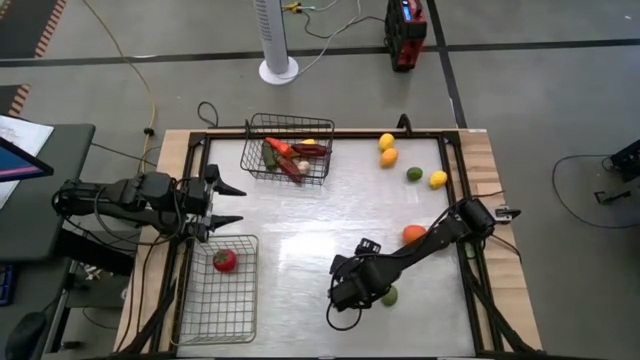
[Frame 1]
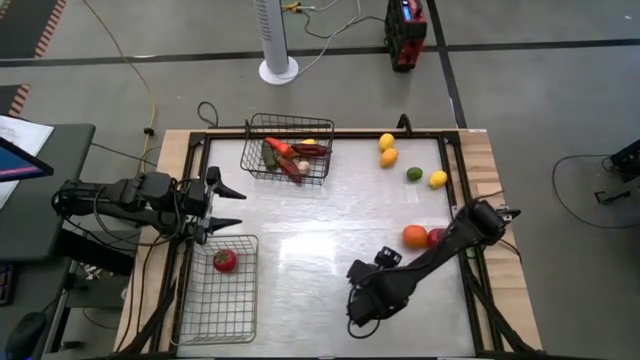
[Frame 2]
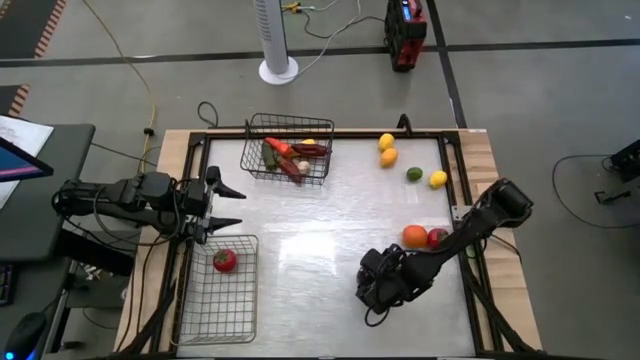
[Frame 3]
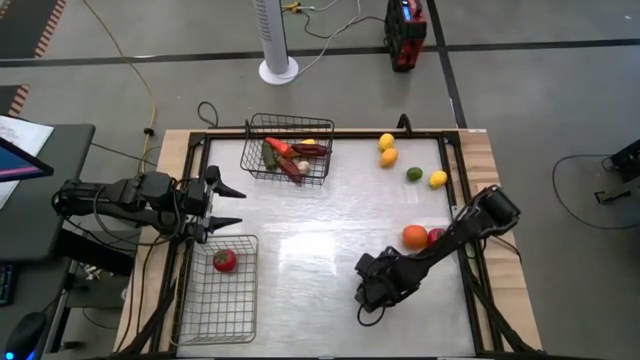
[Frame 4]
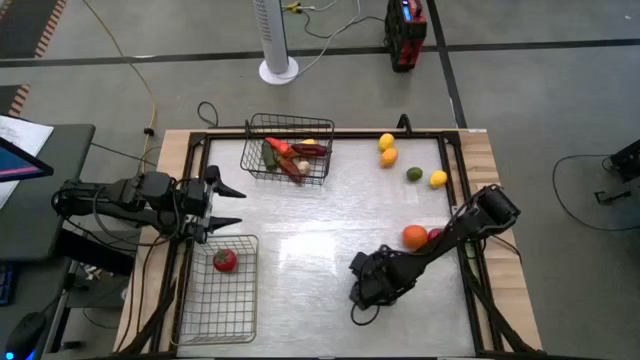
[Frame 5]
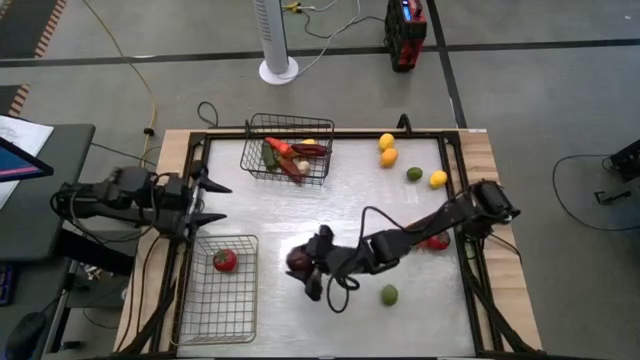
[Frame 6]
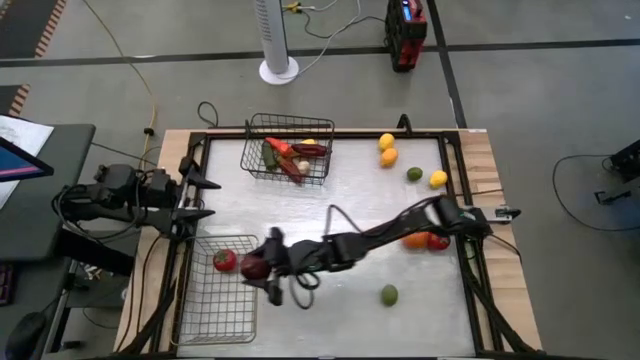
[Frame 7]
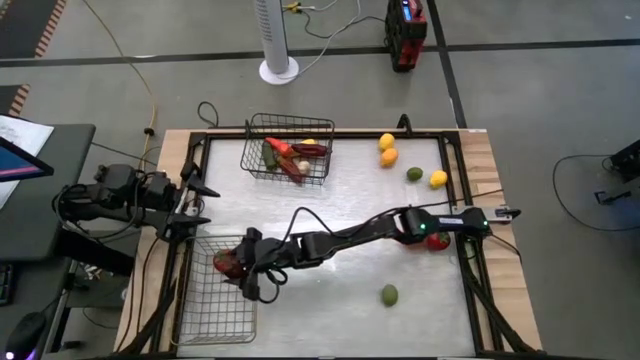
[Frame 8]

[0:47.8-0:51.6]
Task: Sort produce into baskets
Put the red apple into the silver wire basket

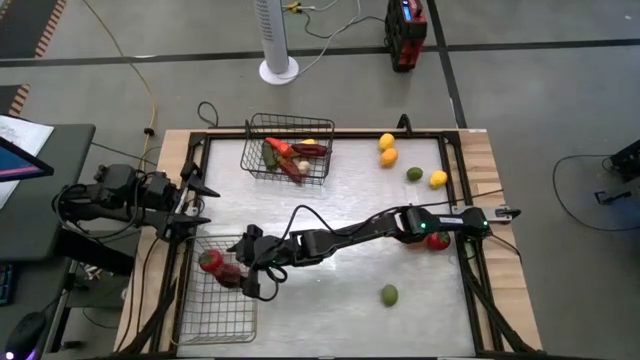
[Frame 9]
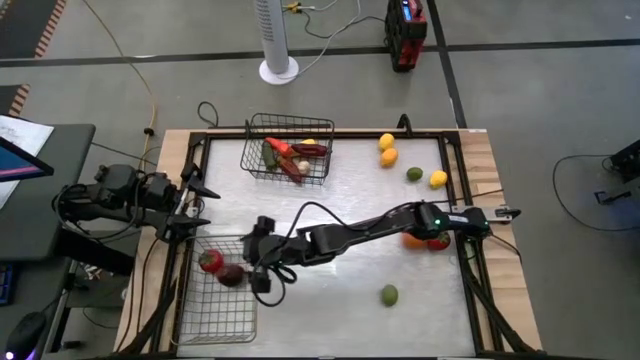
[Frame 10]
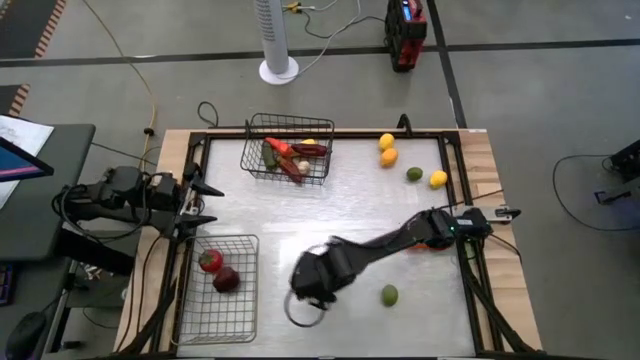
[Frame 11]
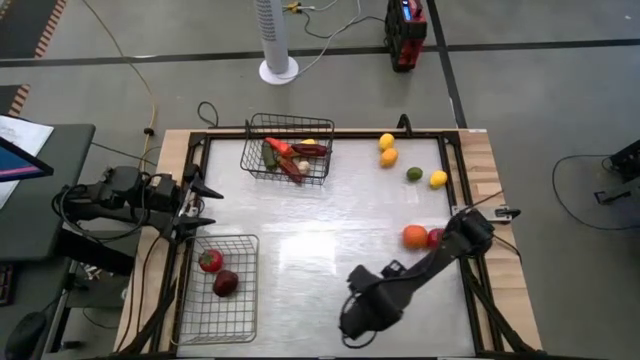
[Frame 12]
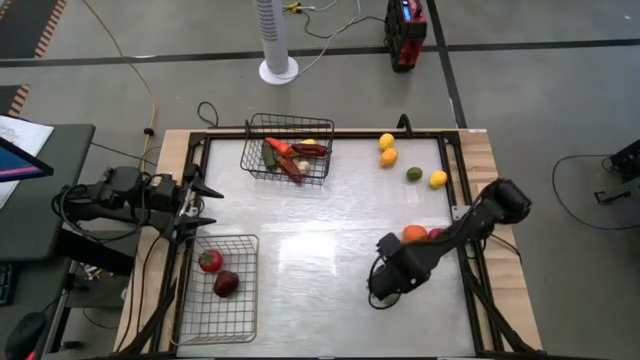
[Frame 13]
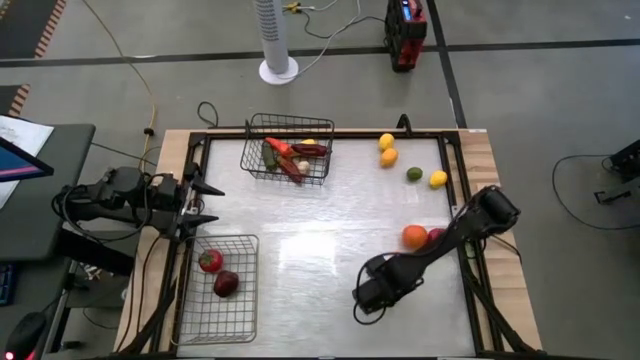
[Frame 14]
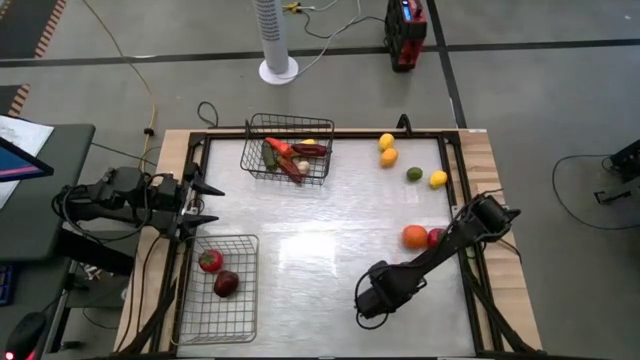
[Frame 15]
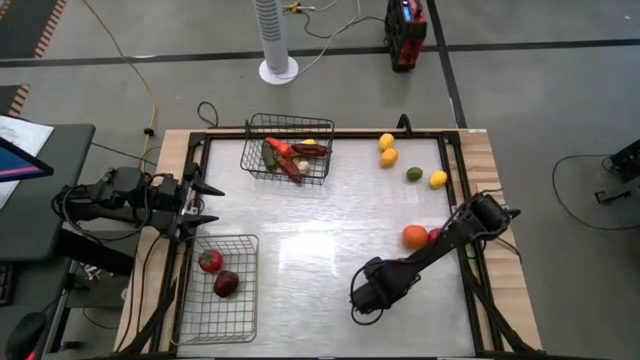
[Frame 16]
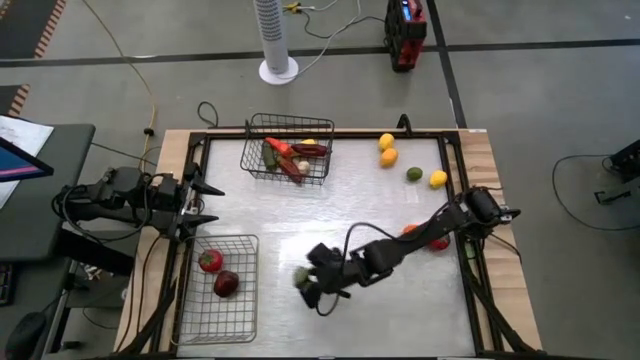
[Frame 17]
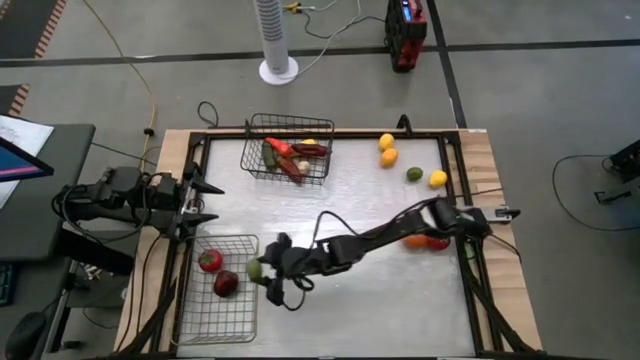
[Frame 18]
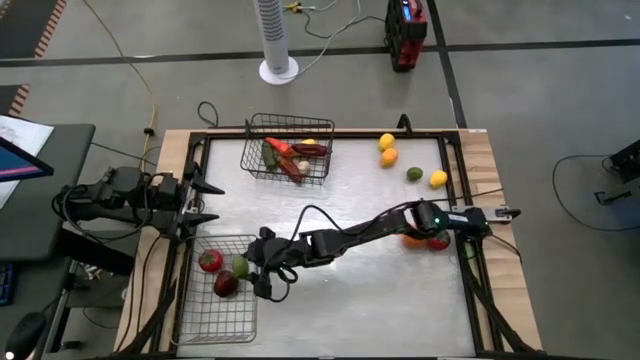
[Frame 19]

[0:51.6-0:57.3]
Put the bottom green lime into the silver wire basket

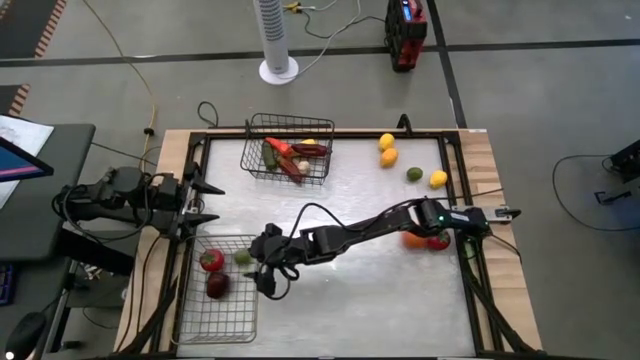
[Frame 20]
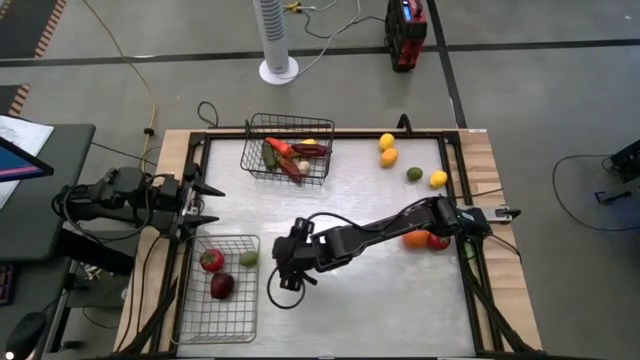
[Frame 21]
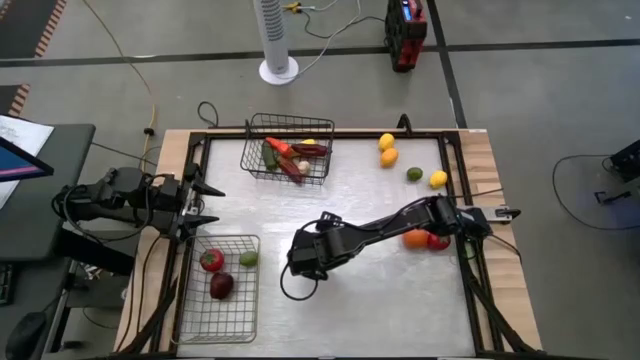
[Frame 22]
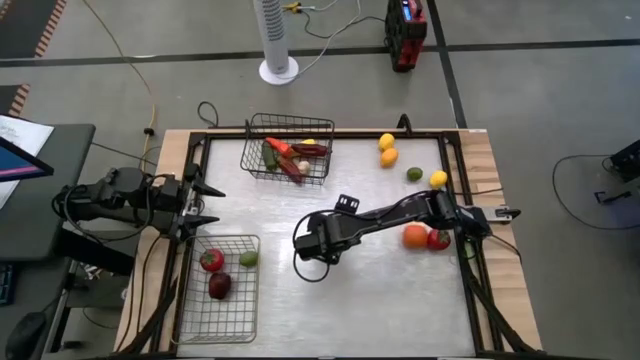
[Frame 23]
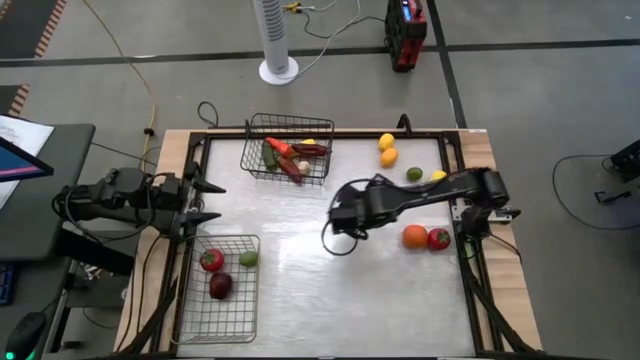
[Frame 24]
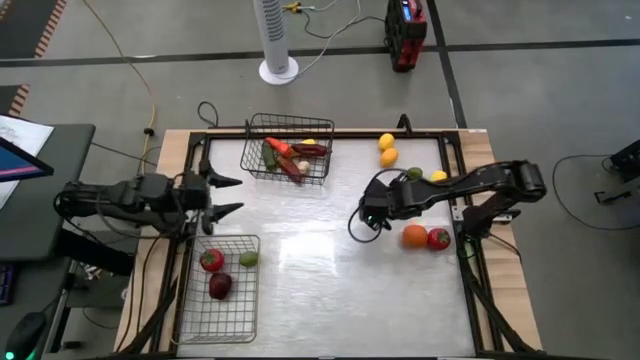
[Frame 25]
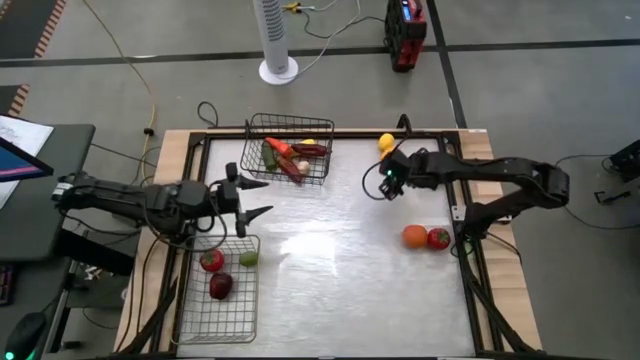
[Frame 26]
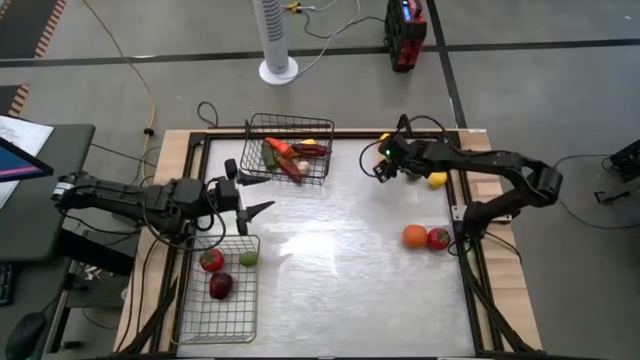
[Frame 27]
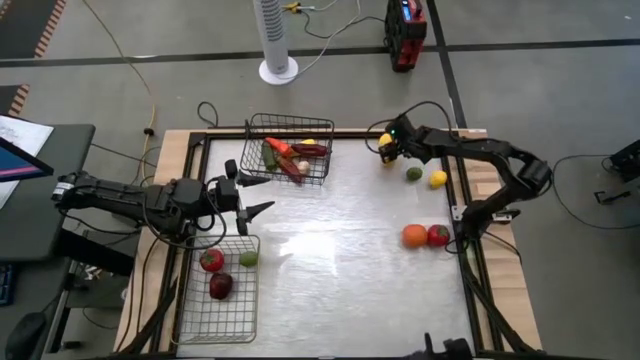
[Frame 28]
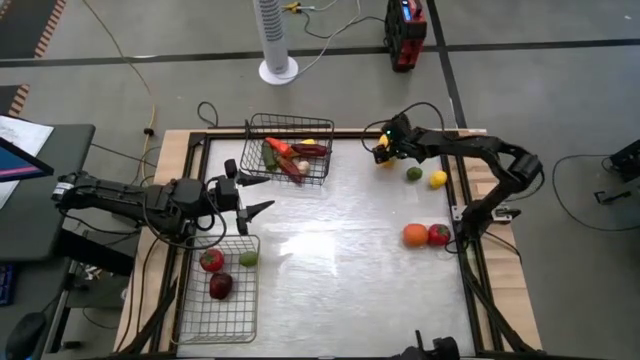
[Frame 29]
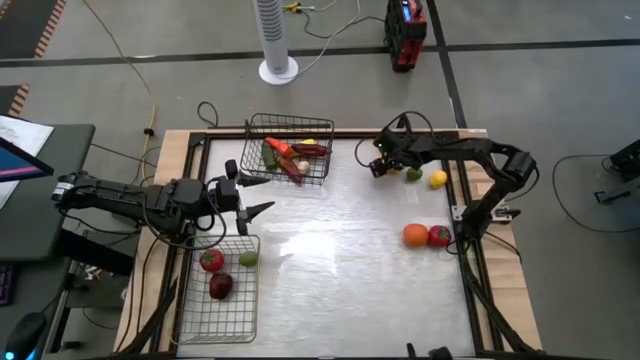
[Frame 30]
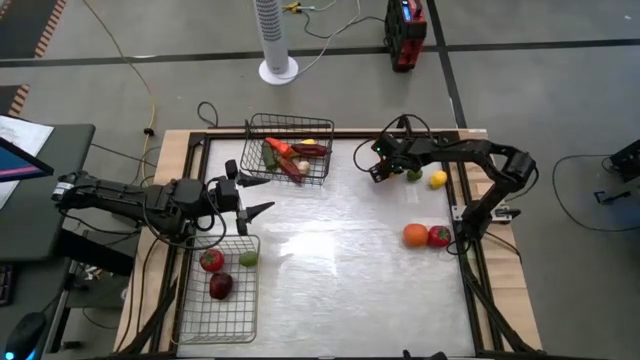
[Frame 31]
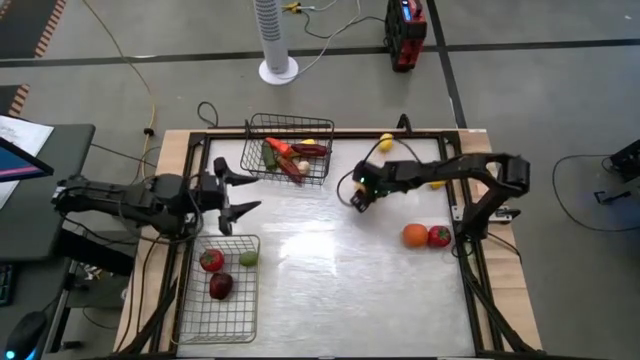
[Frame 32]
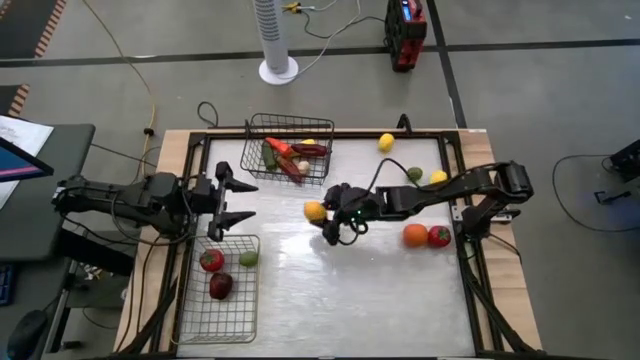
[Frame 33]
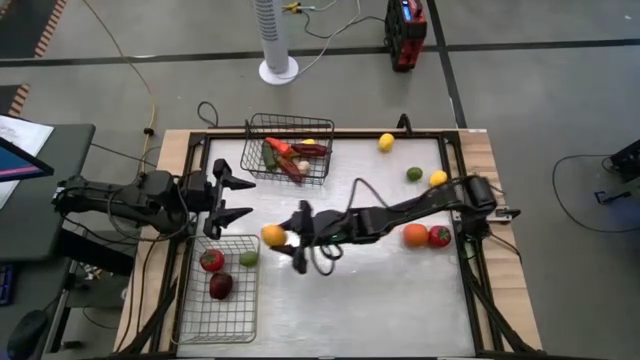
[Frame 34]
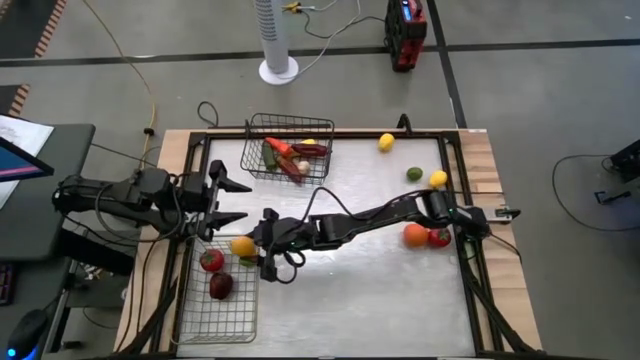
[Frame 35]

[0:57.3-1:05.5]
Put the middle yellow lemon into the silver wire basket

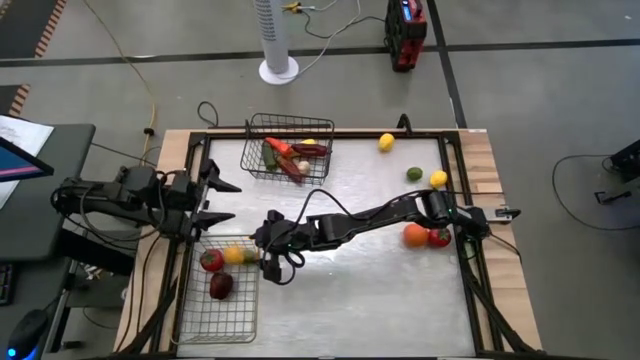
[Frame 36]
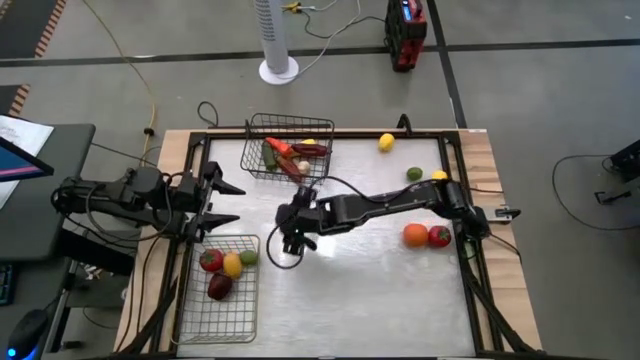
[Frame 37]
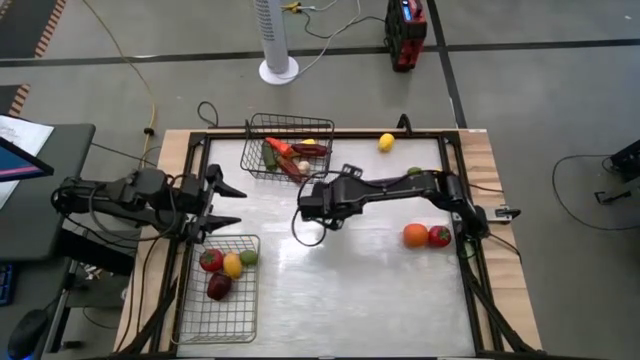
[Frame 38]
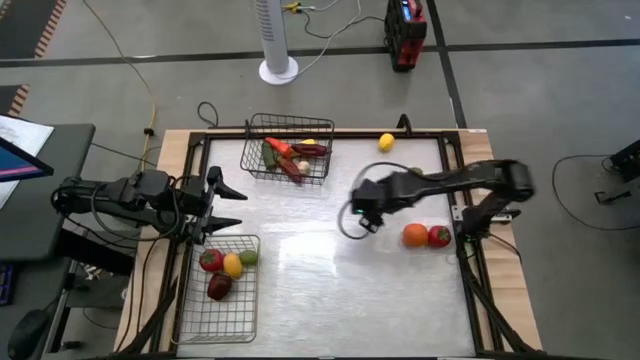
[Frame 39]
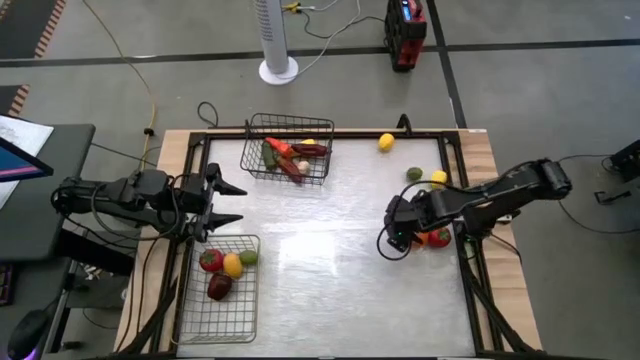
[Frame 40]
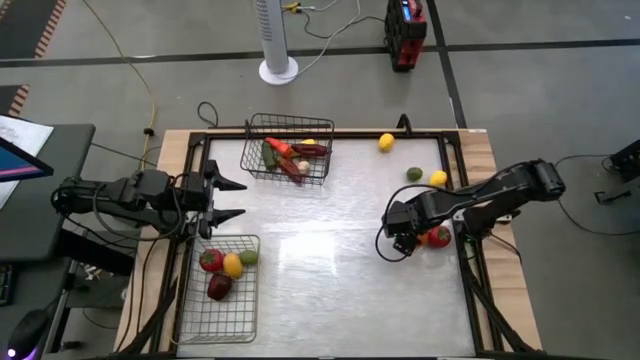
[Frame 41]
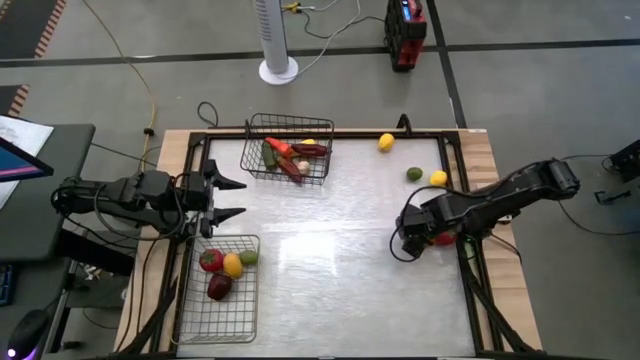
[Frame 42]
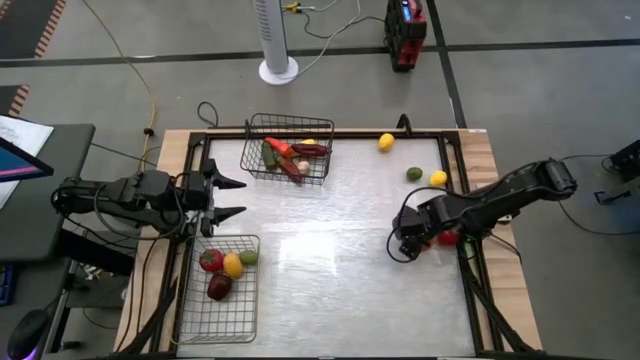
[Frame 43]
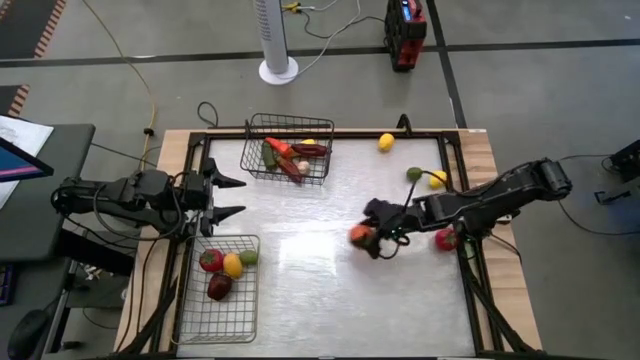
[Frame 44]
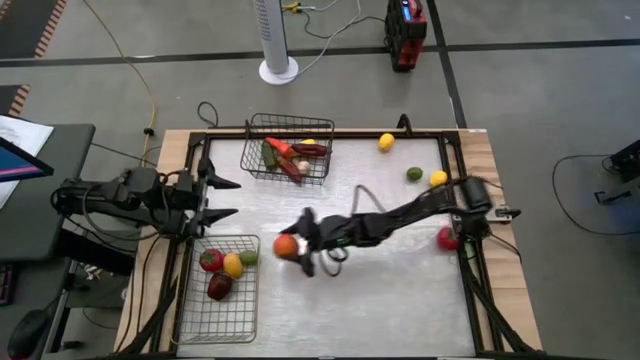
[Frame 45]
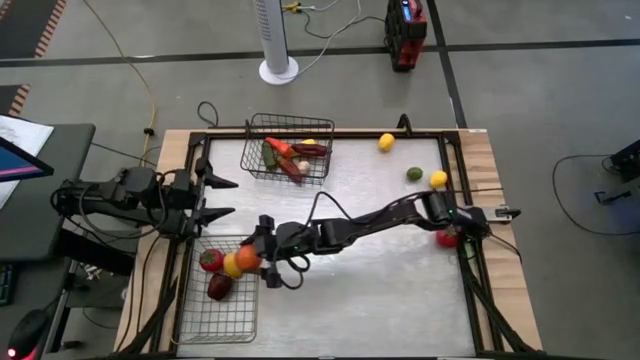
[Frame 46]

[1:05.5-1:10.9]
Put the orange into the silver wire basket
